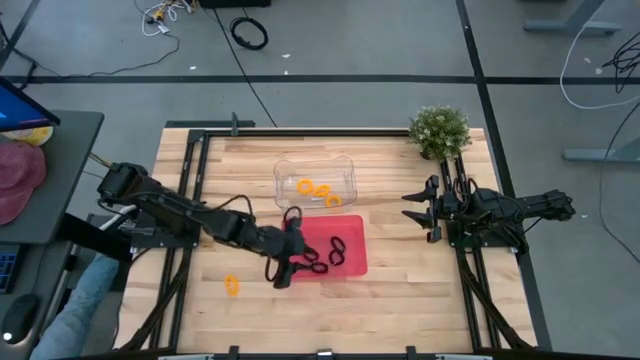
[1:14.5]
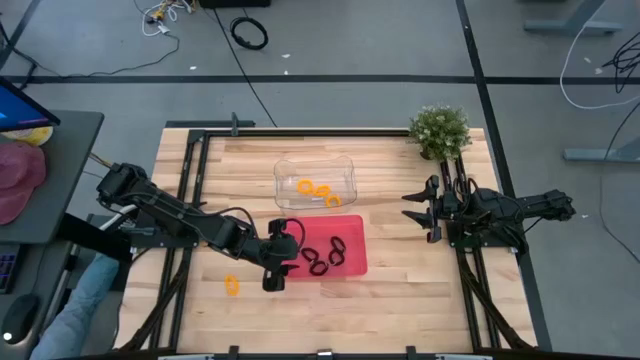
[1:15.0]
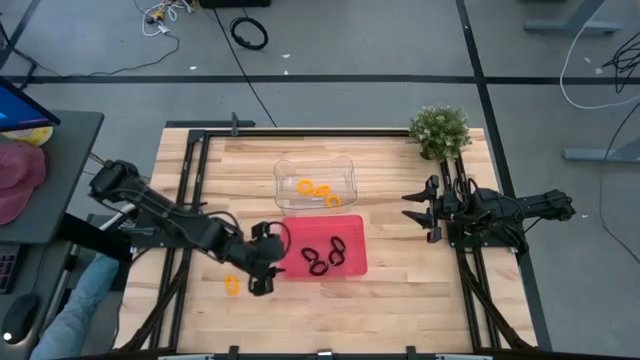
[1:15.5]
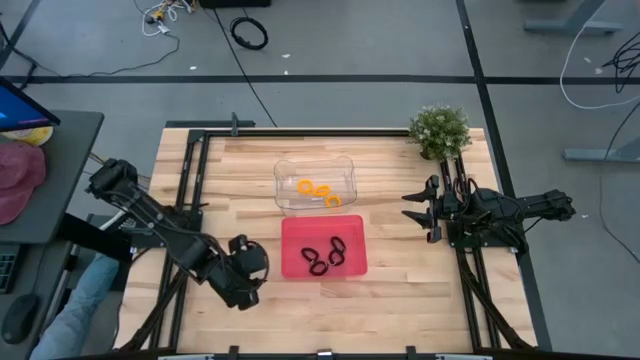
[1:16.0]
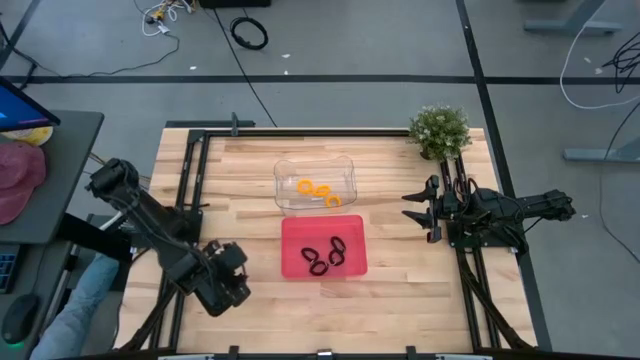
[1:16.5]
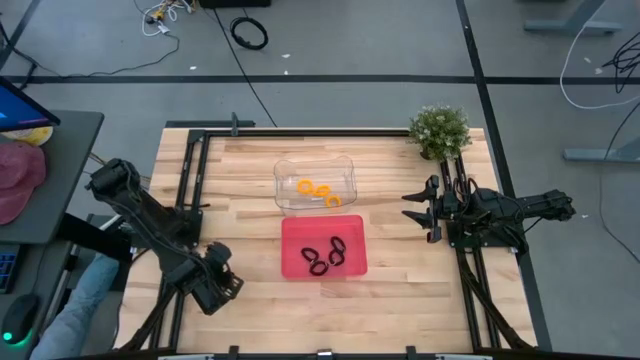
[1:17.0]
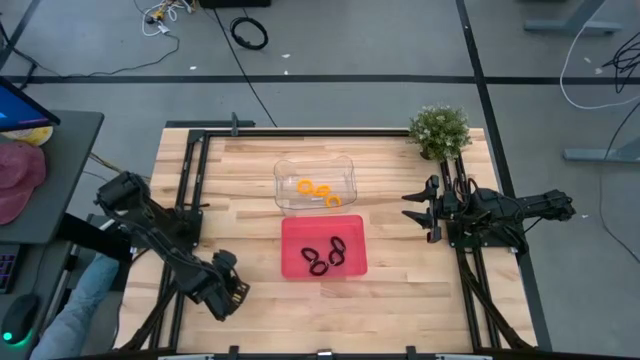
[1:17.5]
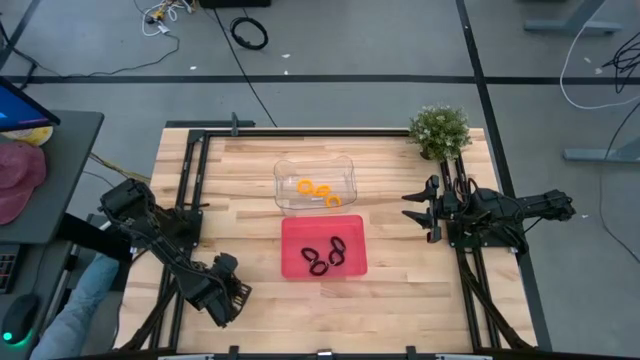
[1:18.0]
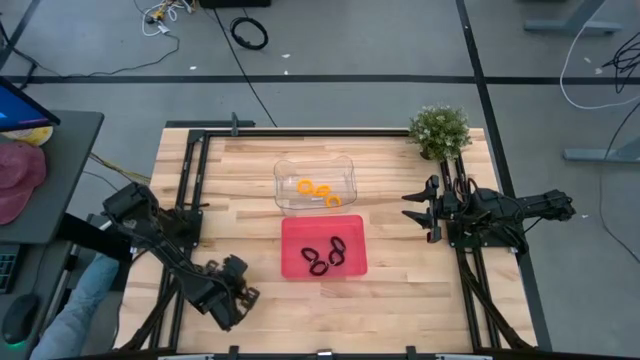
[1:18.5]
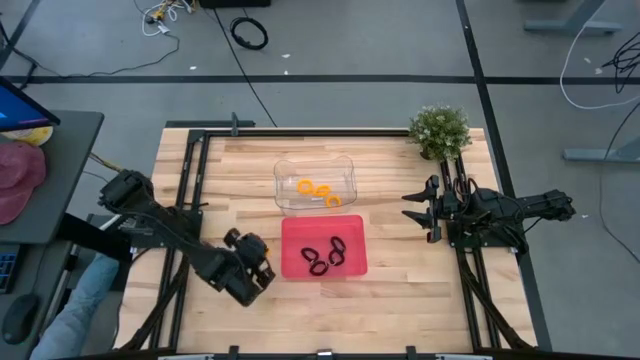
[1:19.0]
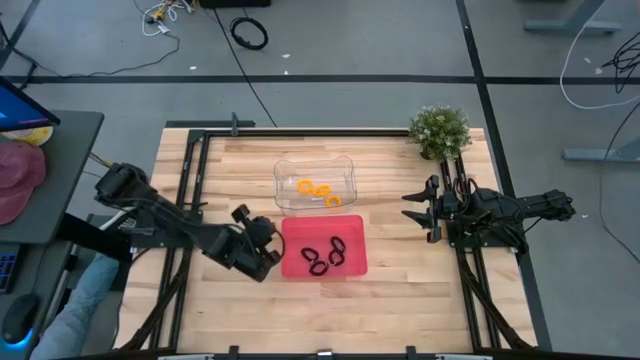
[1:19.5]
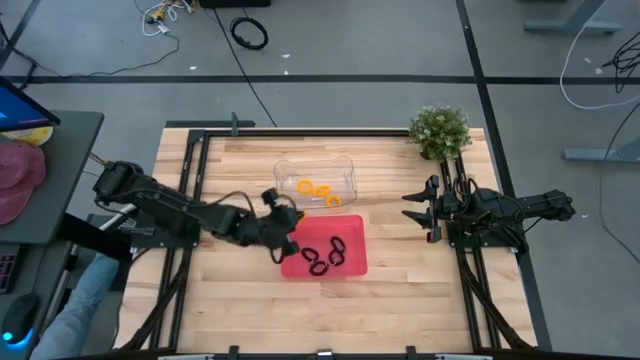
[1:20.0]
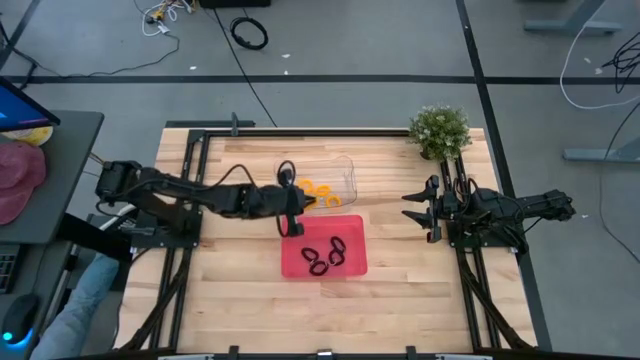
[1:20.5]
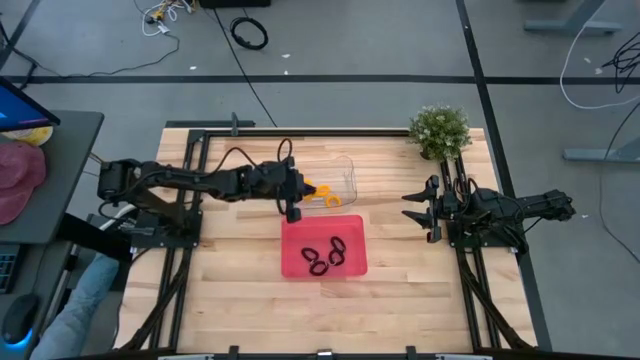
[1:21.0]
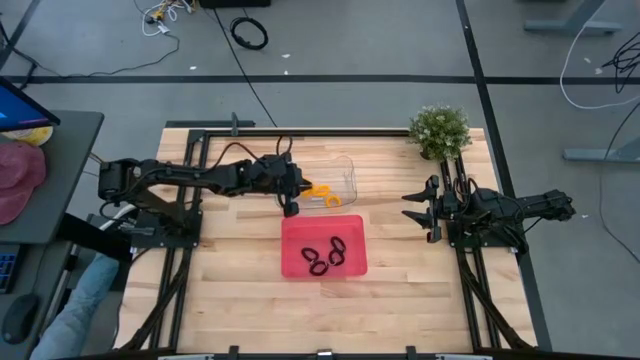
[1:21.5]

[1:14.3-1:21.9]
Task: Sort spring keychains
Put the yellow spring keychain into the transparent bin

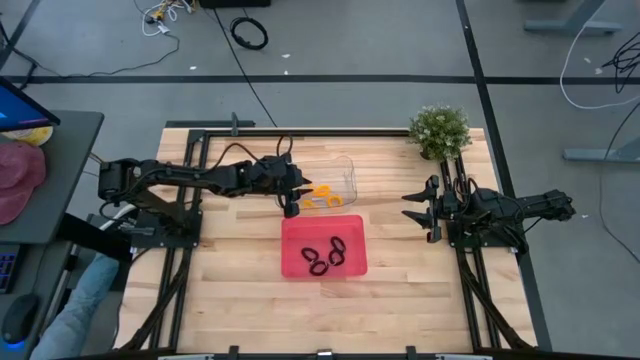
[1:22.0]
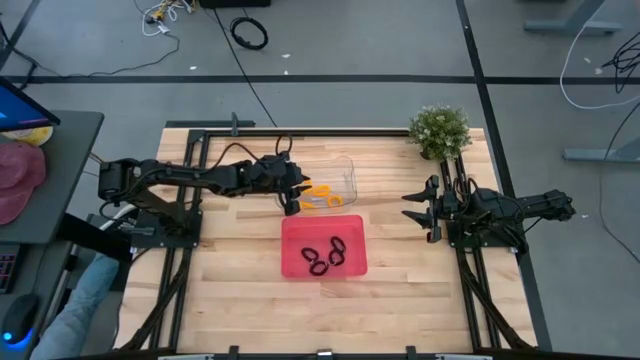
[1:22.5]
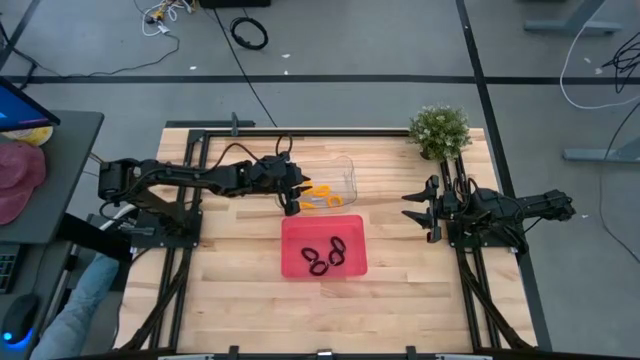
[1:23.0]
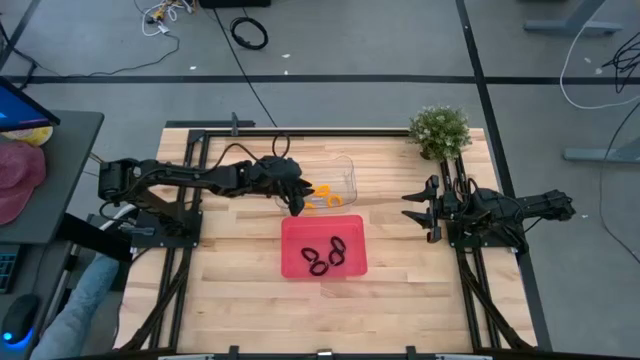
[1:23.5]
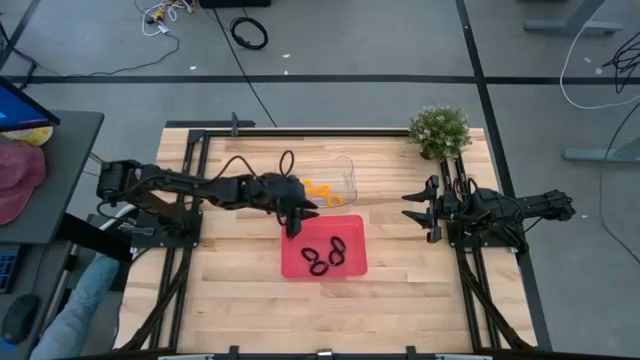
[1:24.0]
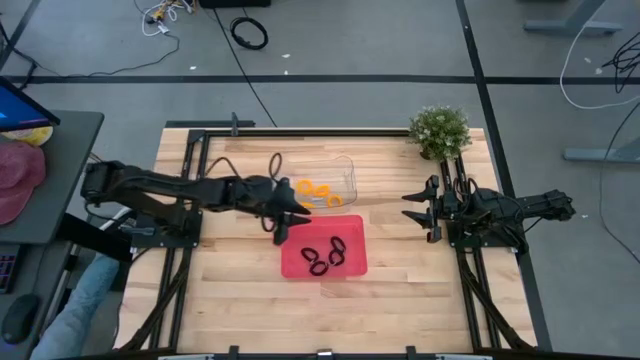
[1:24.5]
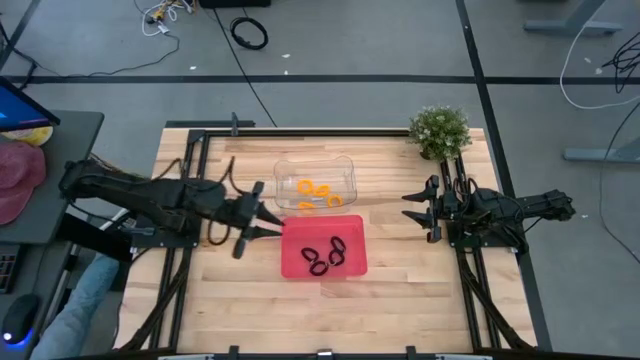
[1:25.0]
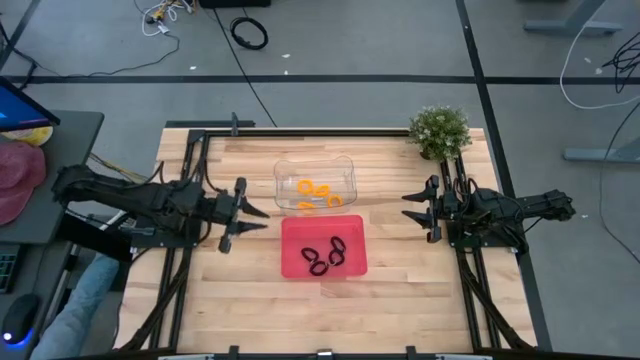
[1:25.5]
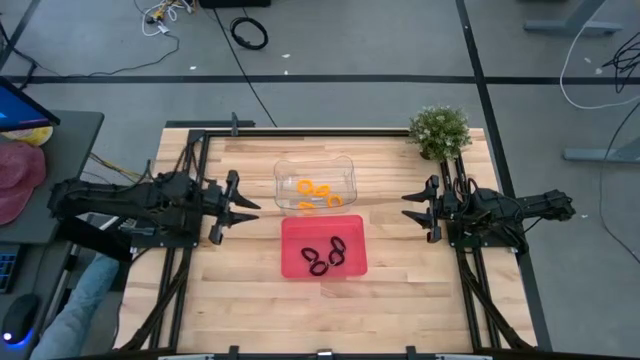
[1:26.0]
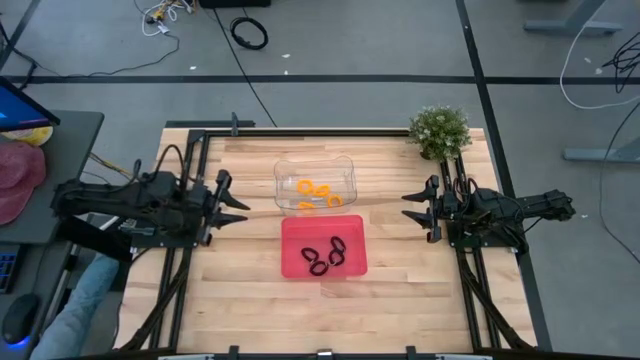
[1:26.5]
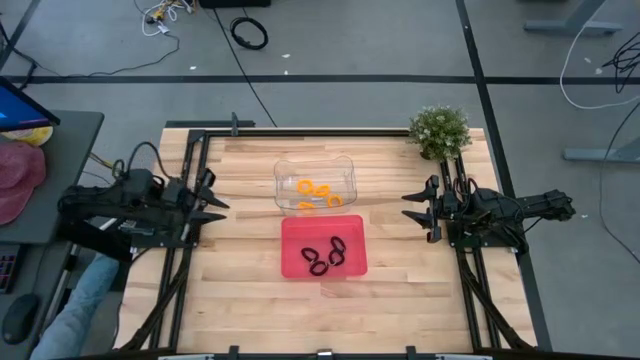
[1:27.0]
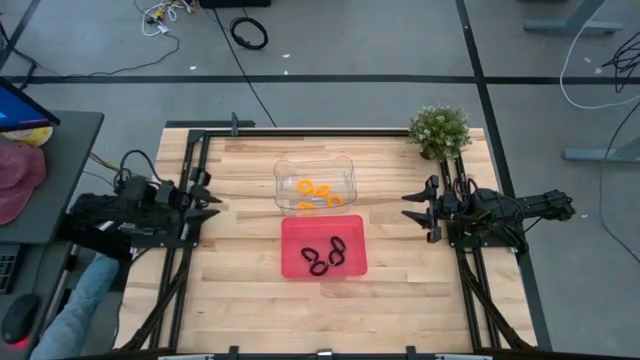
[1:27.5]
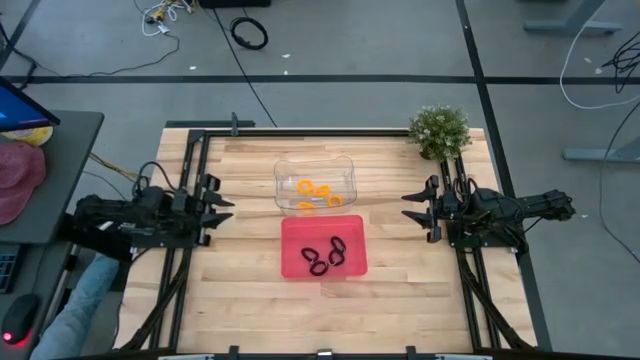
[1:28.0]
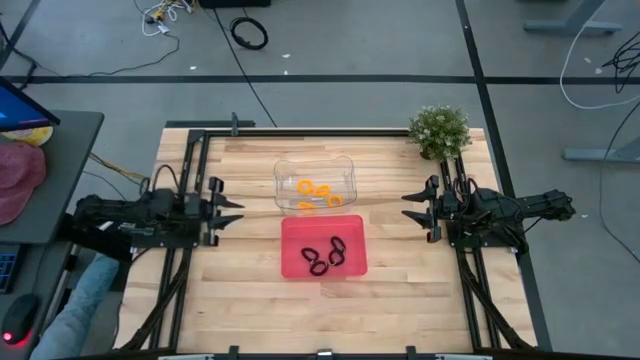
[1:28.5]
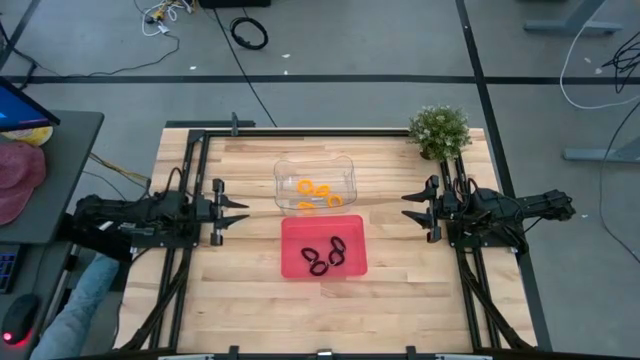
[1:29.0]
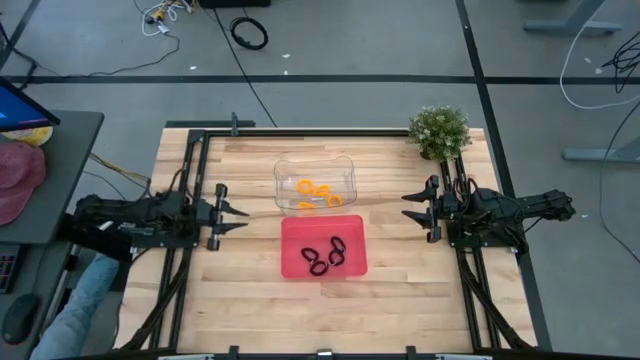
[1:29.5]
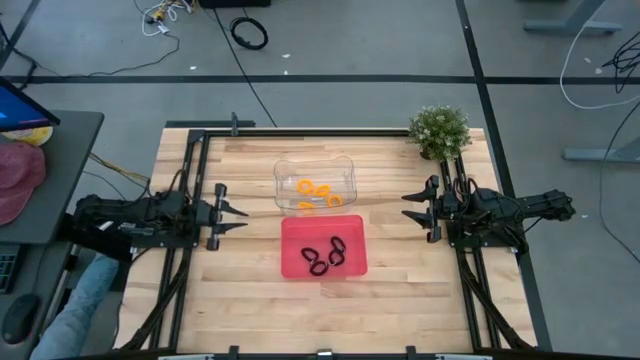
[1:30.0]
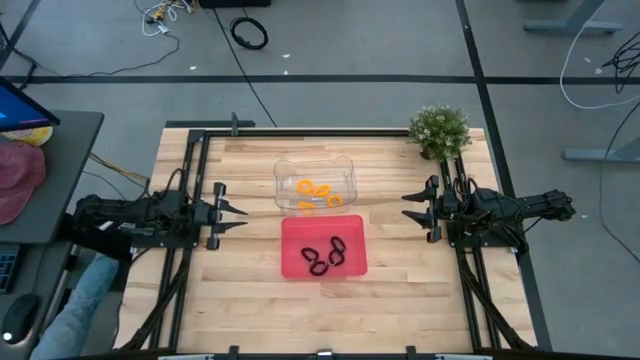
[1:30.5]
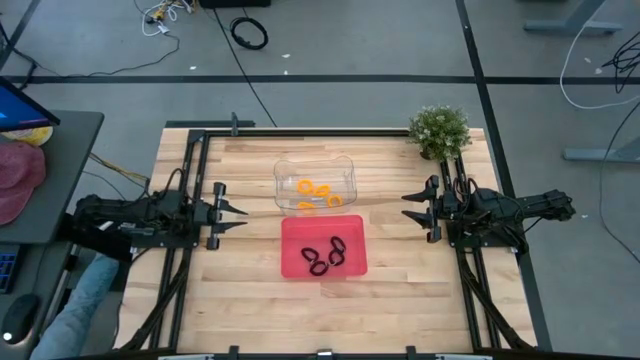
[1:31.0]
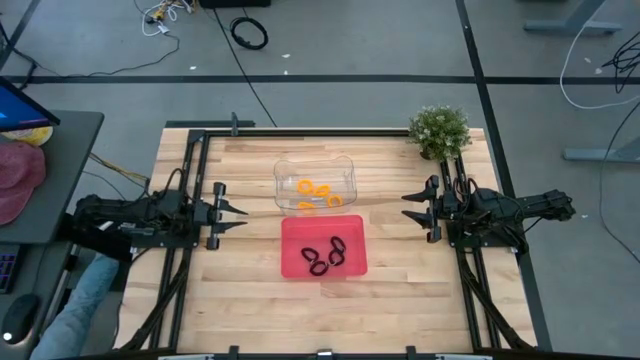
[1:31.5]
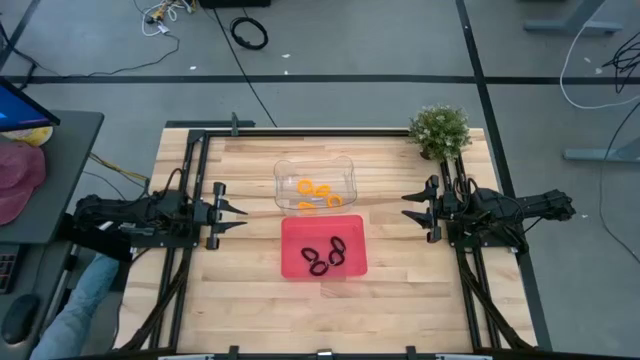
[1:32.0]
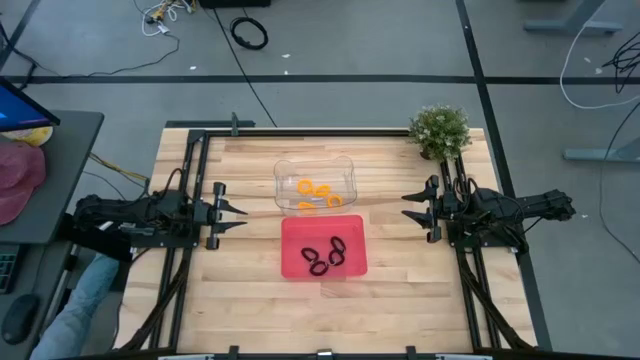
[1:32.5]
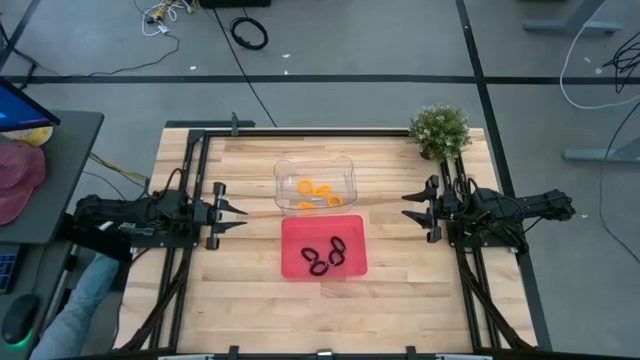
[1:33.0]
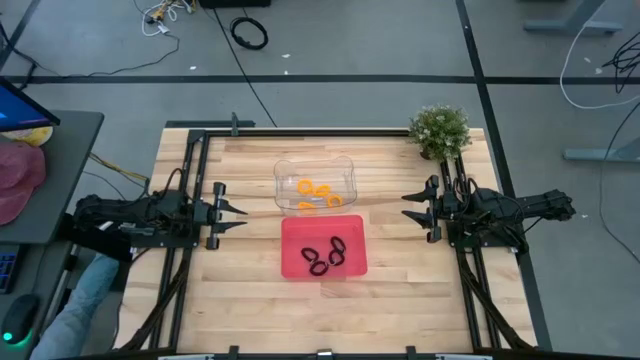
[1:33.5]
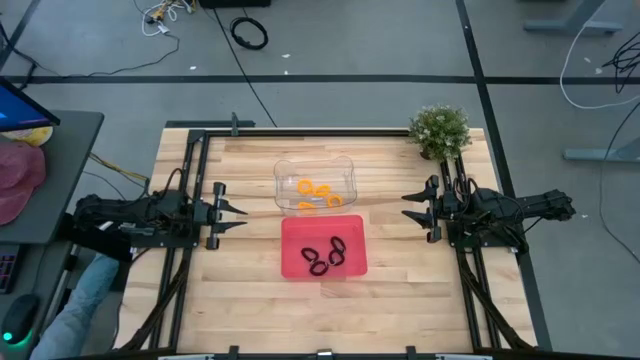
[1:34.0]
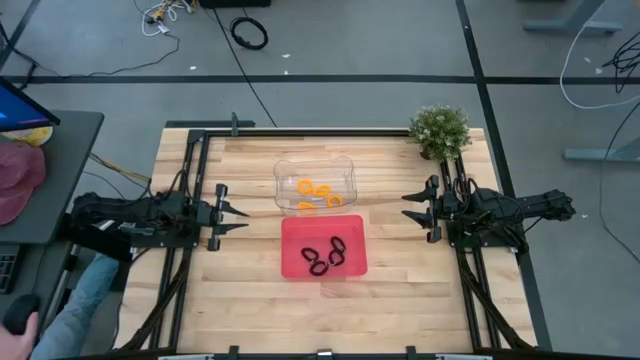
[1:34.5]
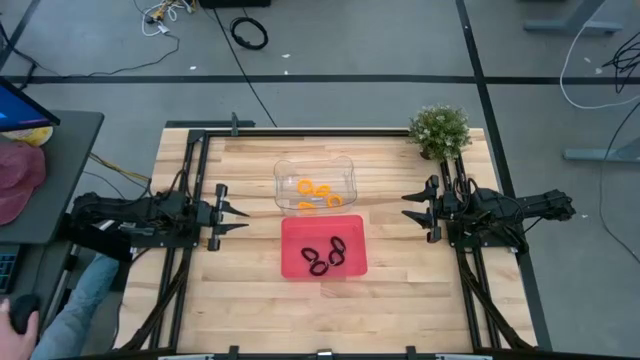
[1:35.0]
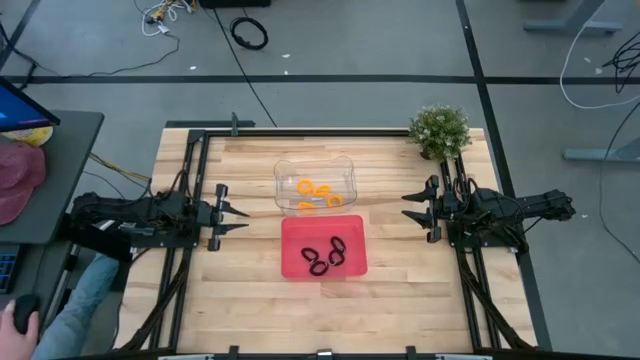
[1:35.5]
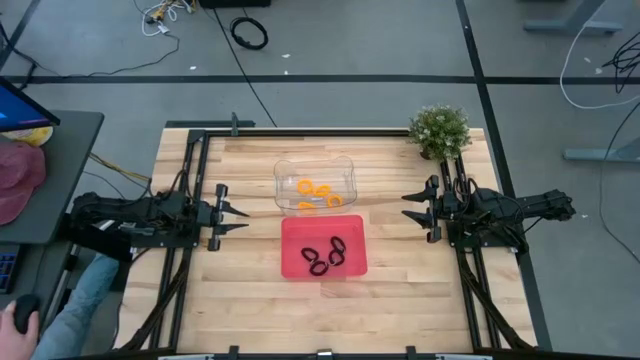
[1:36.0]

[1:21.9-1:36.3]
Return to Home Position
